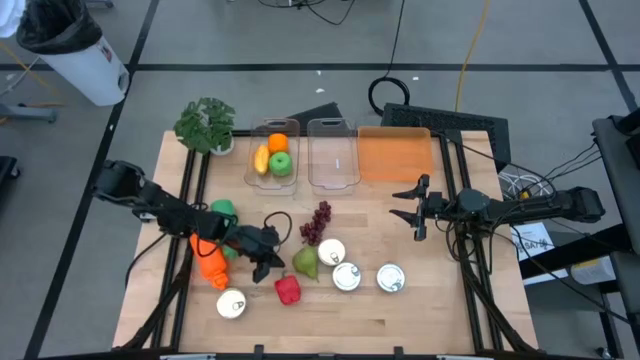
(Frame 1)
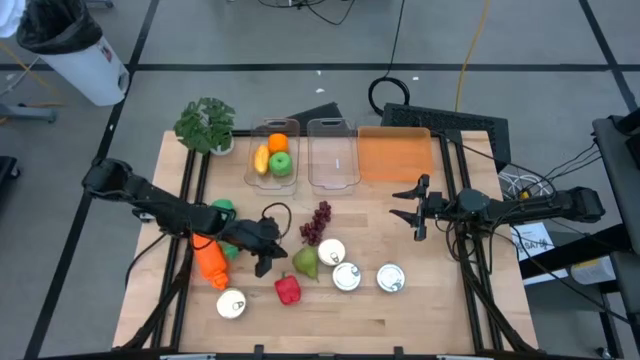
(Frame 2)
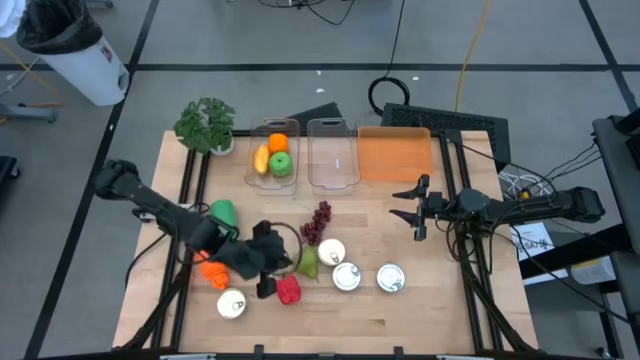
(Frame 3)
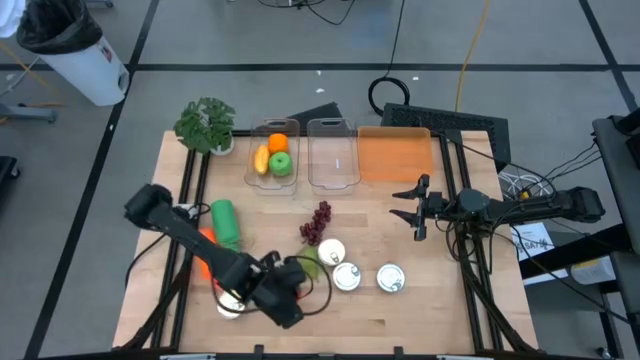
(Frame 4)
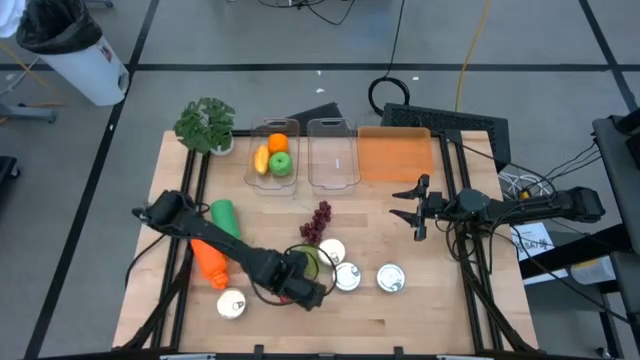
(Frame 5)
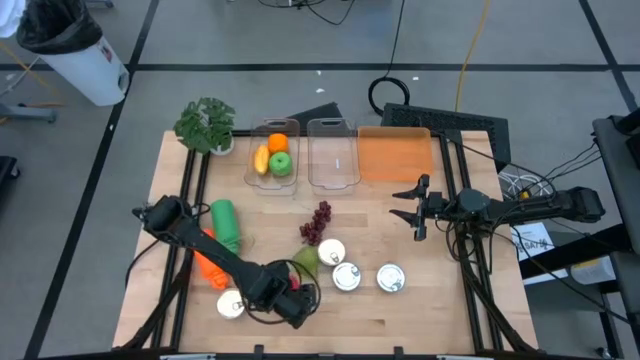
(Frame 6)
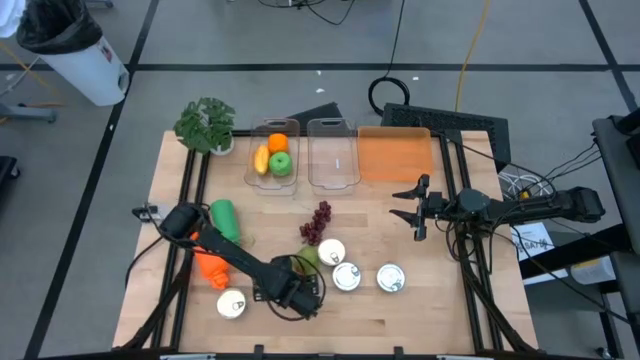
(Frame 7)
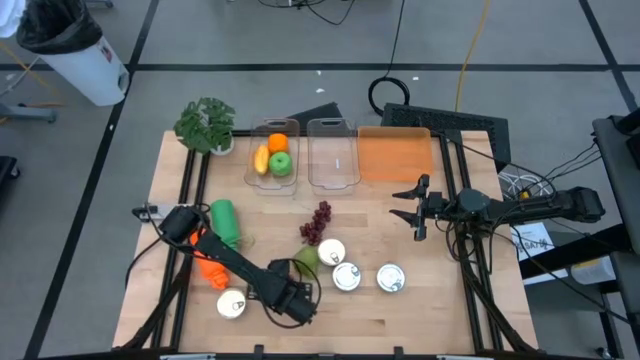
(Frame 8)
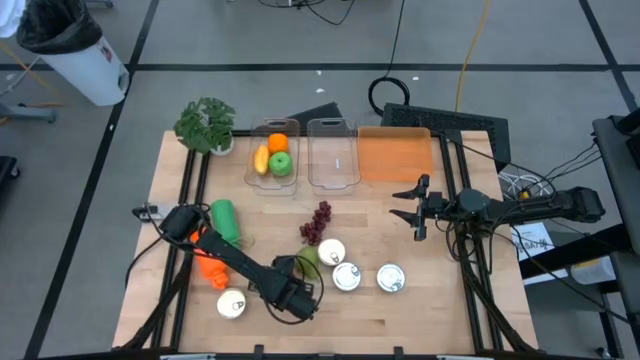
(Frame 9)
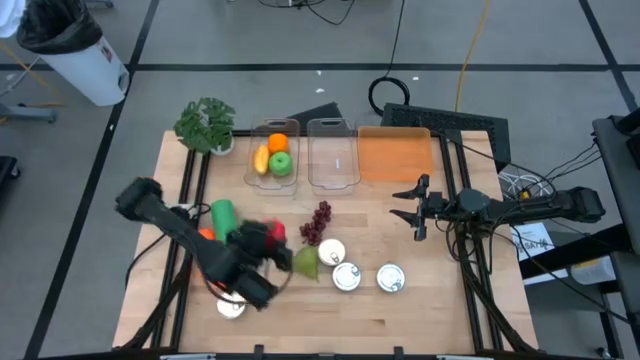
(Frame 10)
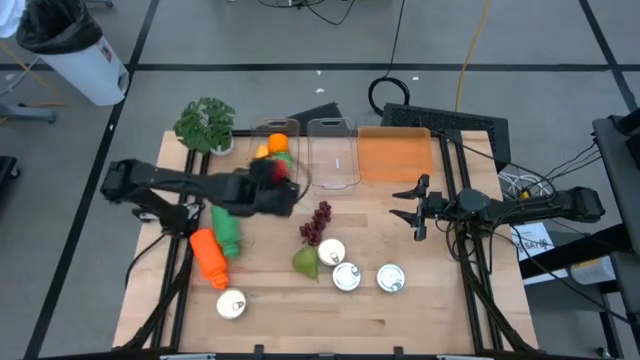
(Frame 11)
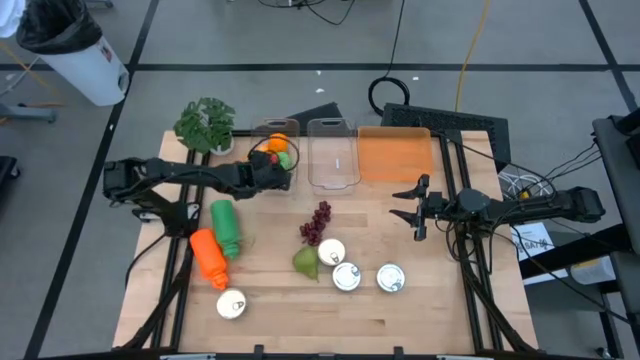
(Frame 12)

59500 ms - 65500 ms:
Task: Pick & Place Food Item
Put the red bell pepper into the left transparent bin

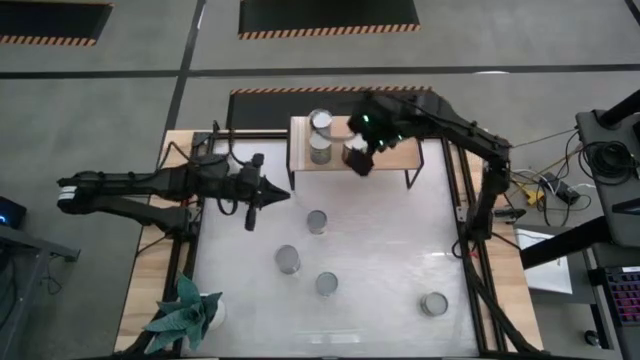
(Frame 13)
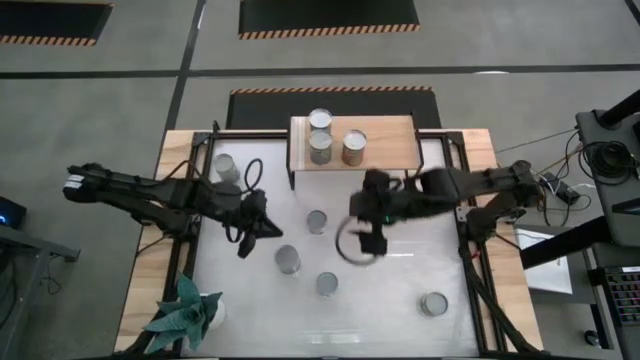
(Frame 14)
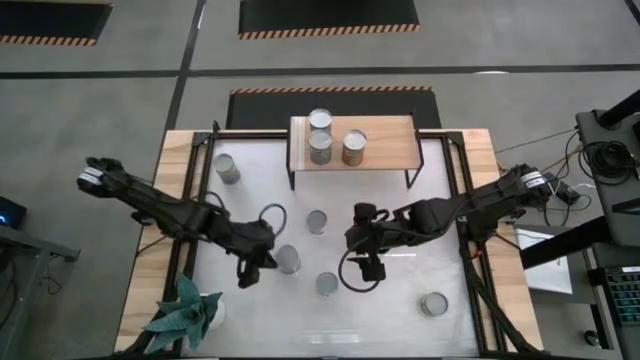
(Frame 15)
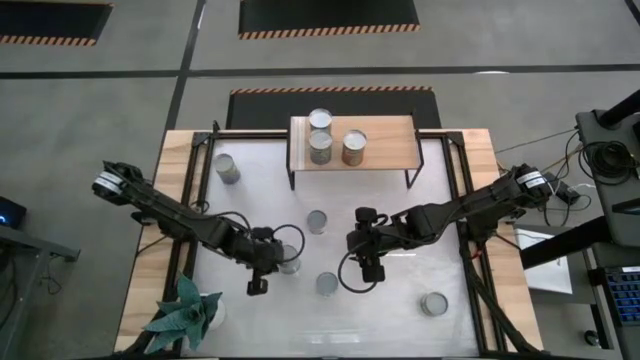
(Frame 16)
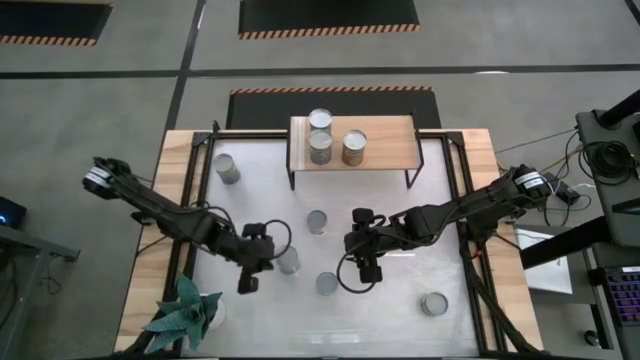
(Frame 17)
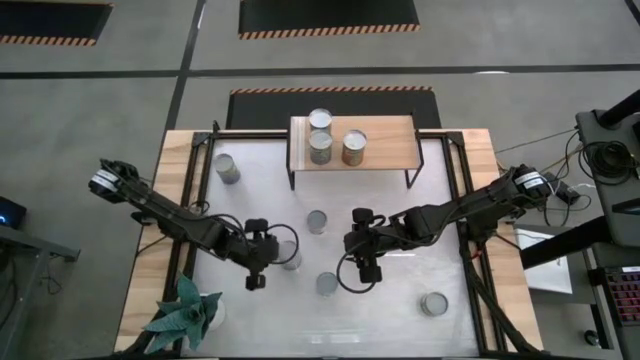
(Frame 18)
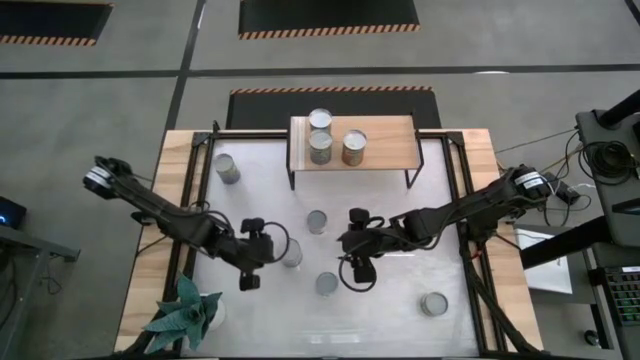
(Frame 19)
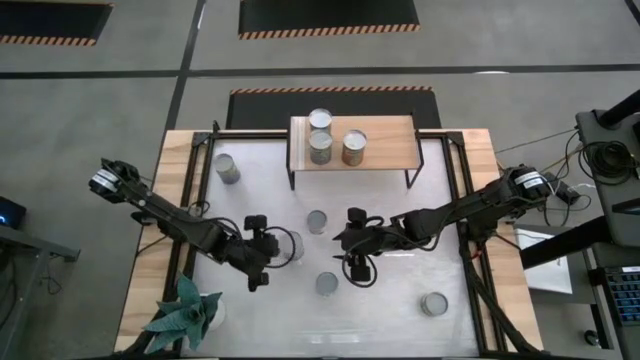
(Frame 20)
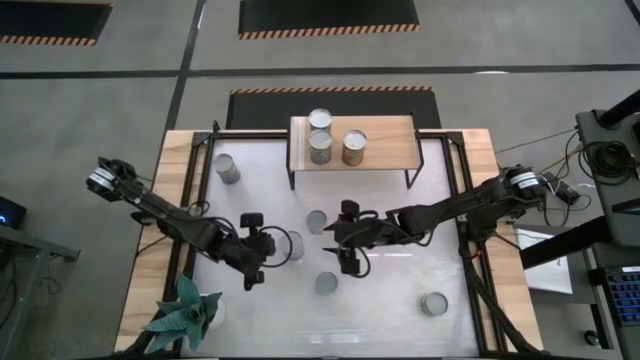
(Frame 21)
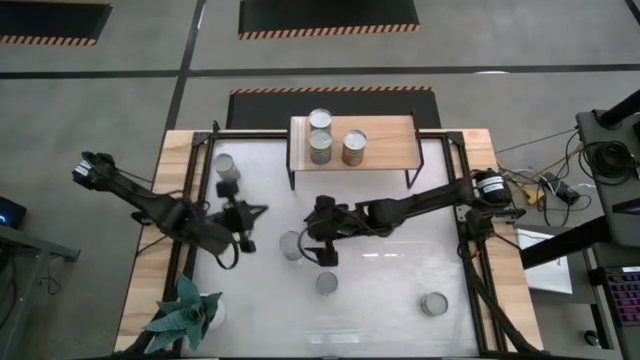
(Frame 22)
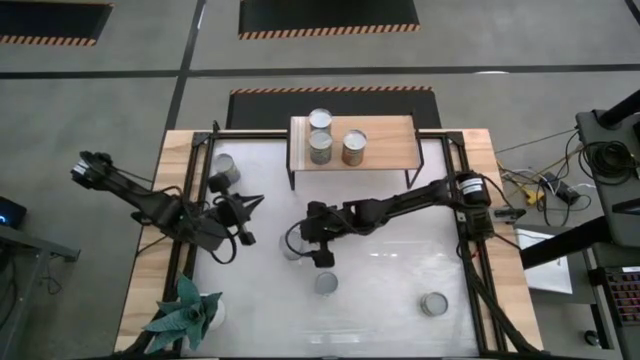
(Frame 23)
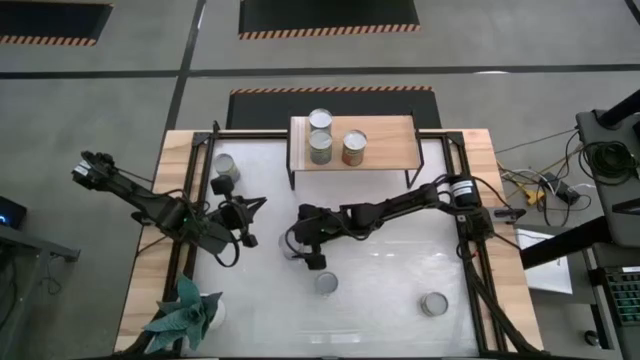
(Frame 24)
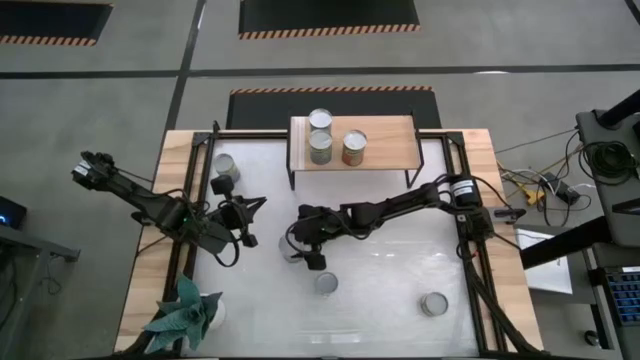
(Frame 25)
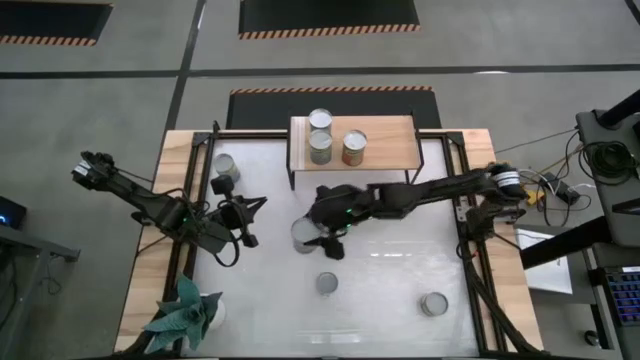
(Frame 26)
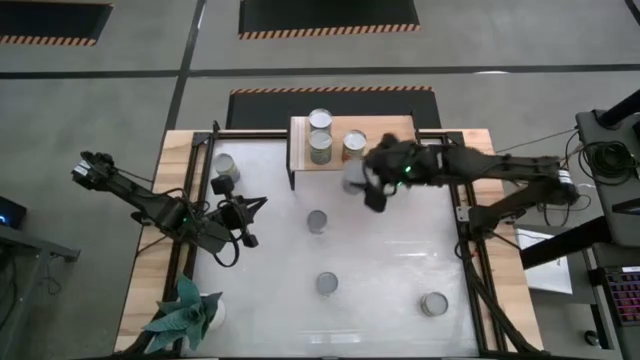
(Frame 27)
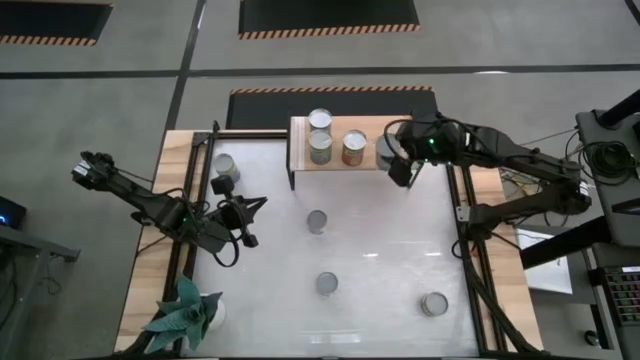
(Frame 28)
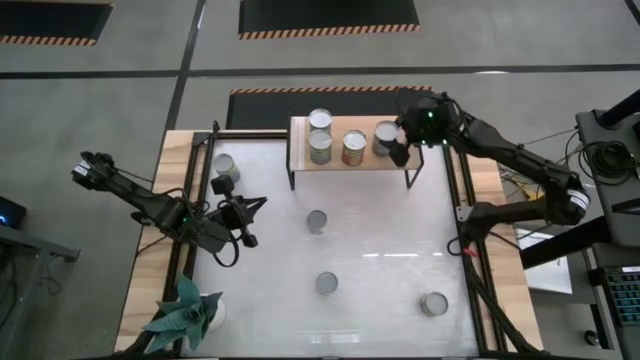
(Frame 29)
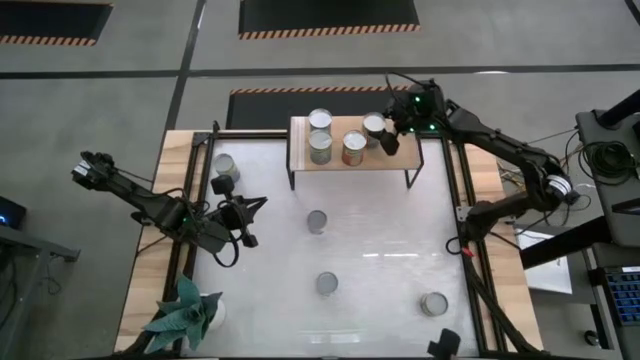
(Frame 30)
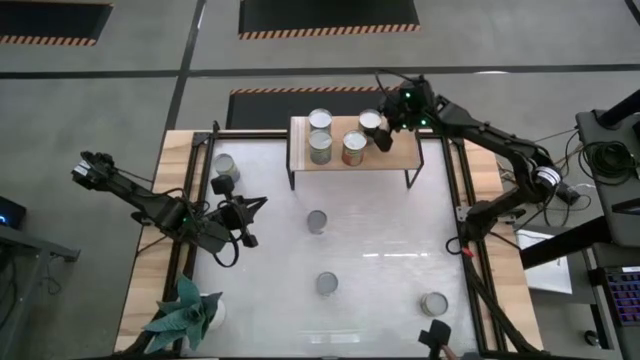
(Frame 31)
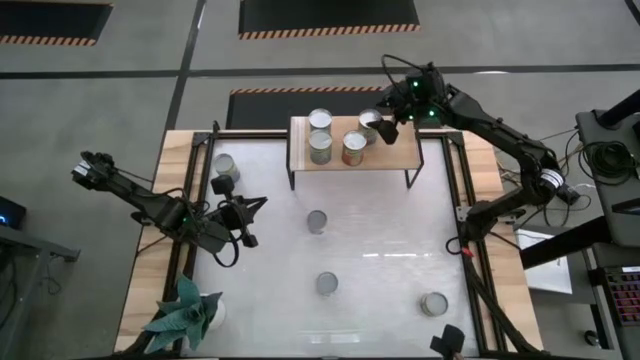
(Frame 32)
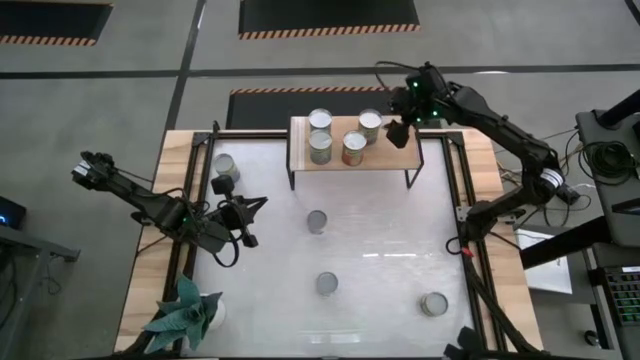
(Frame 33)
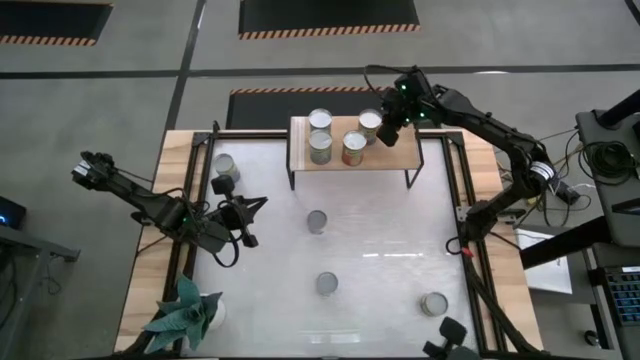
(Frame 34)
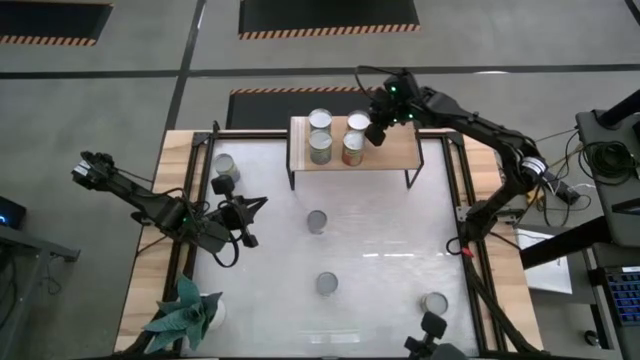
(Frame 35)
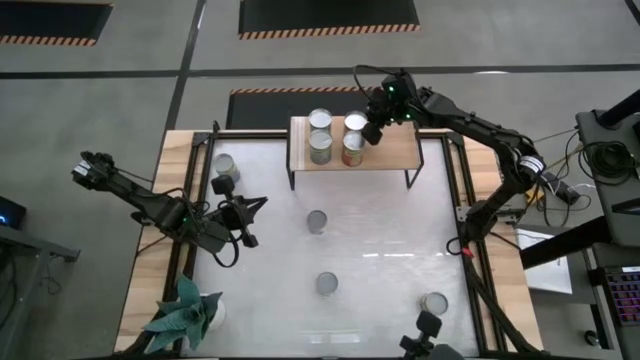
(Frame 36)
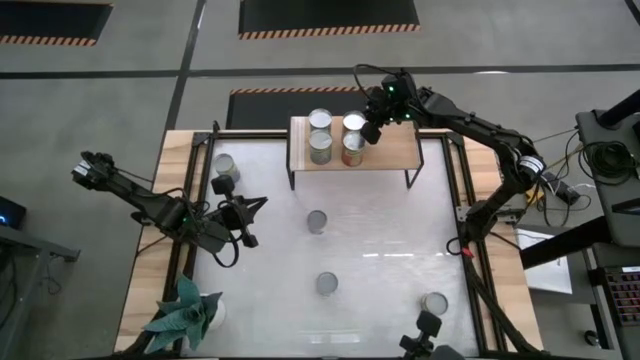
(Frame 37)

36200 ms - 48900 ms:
Task: Pick and place cans onto a shelf
Put the canned peas on the shelf
